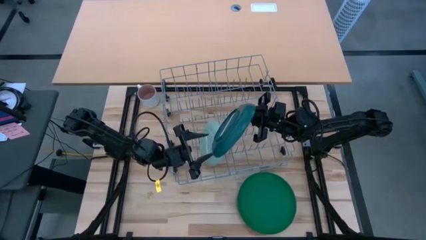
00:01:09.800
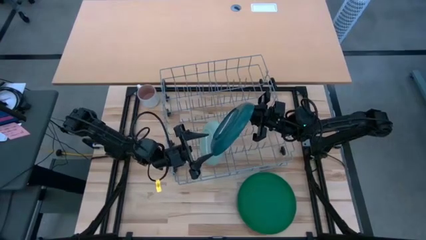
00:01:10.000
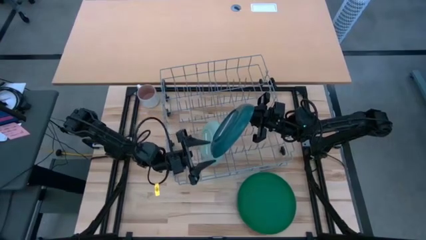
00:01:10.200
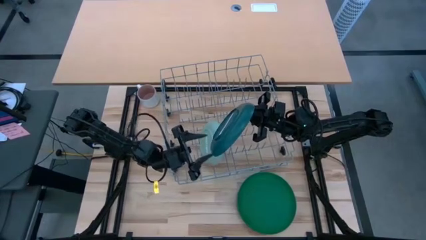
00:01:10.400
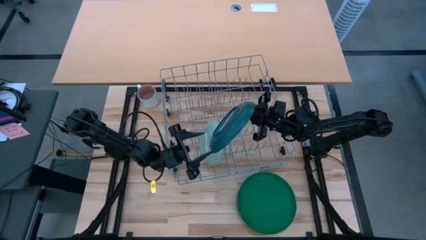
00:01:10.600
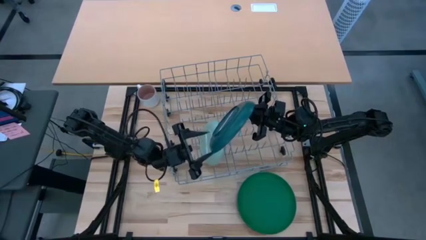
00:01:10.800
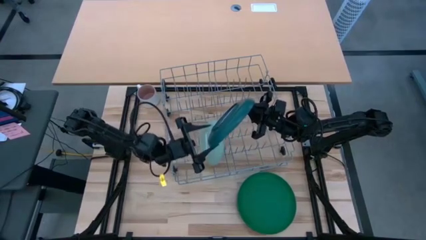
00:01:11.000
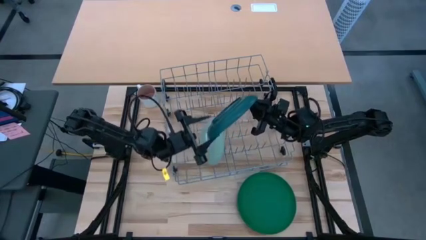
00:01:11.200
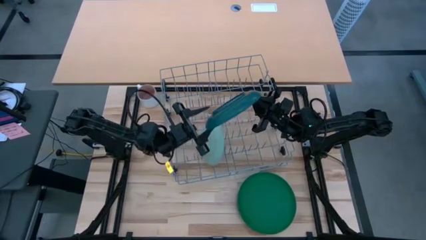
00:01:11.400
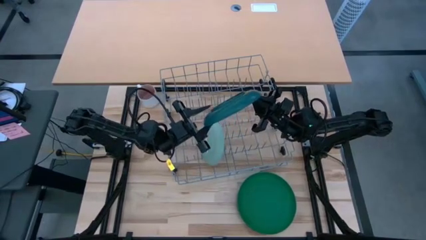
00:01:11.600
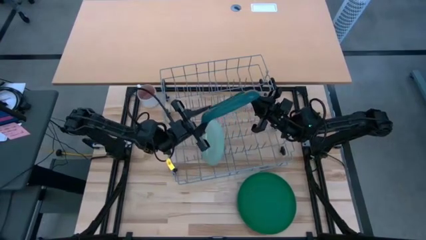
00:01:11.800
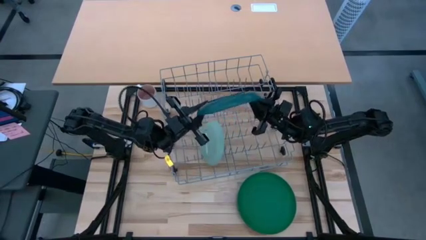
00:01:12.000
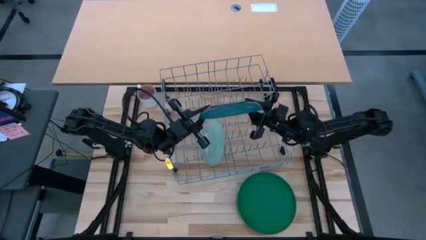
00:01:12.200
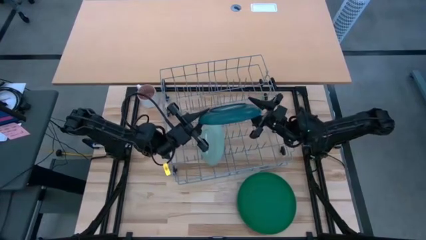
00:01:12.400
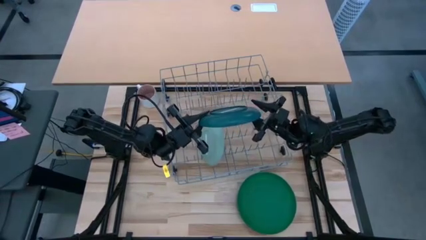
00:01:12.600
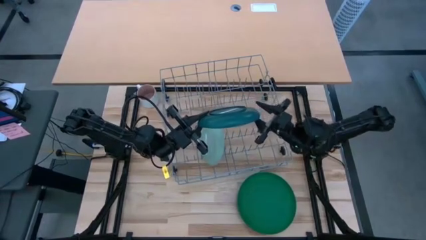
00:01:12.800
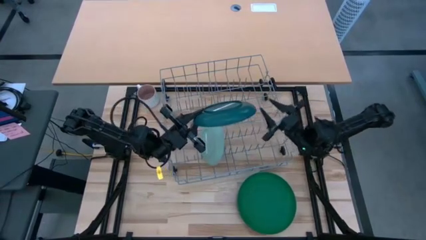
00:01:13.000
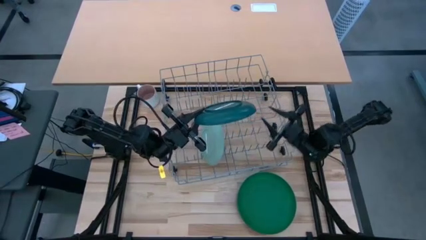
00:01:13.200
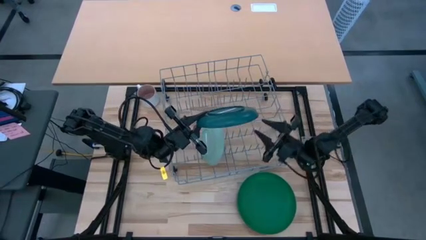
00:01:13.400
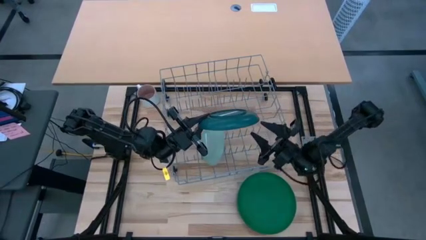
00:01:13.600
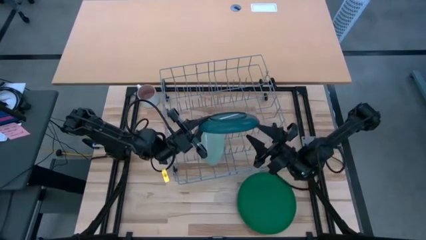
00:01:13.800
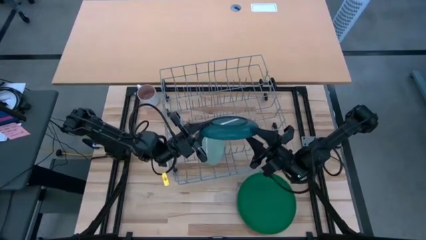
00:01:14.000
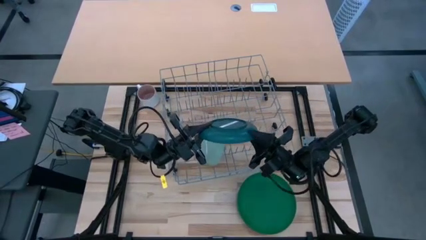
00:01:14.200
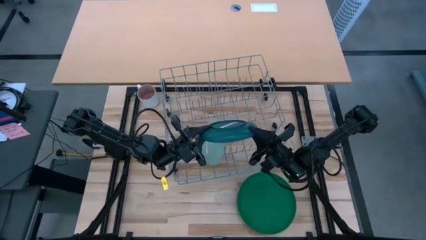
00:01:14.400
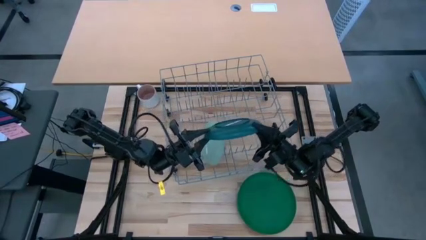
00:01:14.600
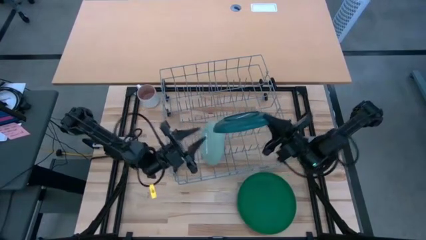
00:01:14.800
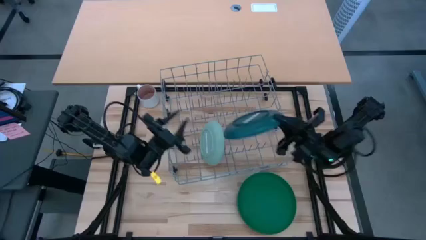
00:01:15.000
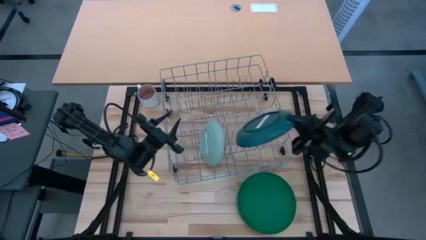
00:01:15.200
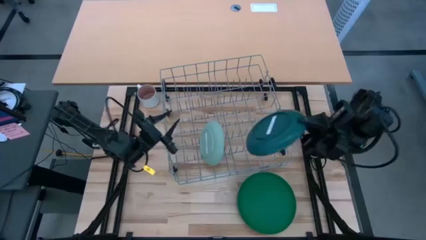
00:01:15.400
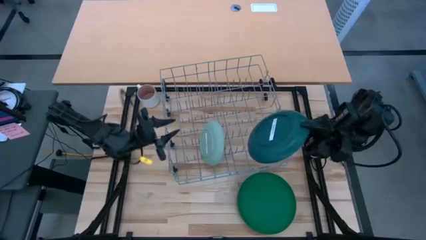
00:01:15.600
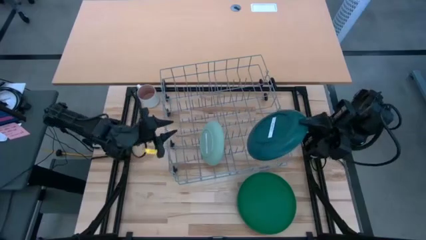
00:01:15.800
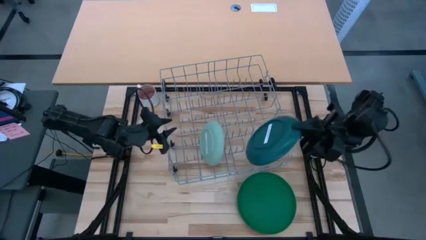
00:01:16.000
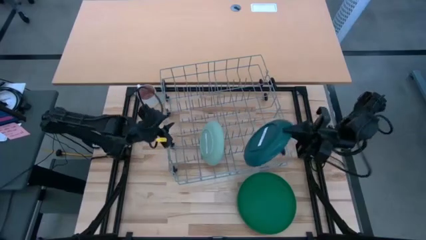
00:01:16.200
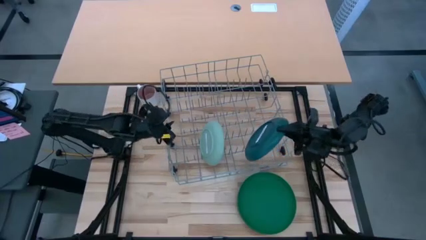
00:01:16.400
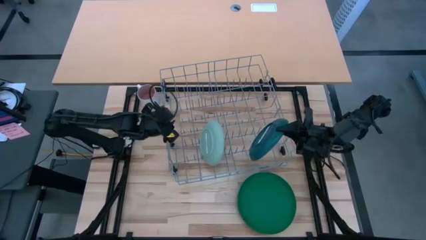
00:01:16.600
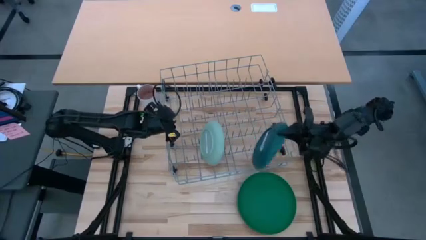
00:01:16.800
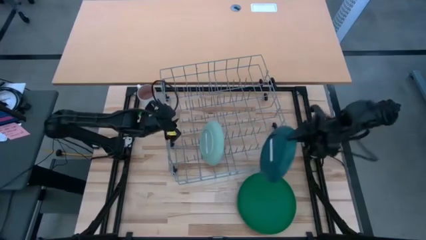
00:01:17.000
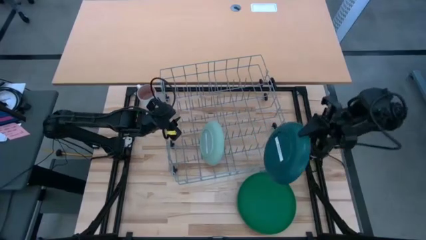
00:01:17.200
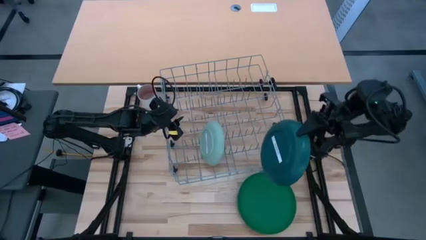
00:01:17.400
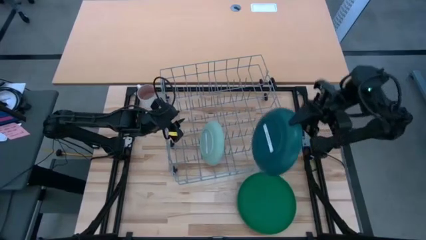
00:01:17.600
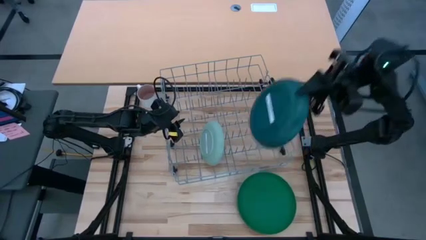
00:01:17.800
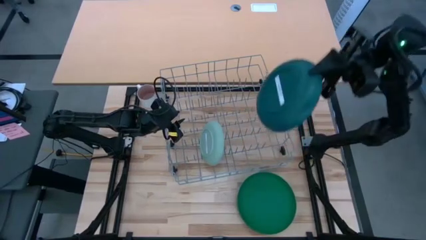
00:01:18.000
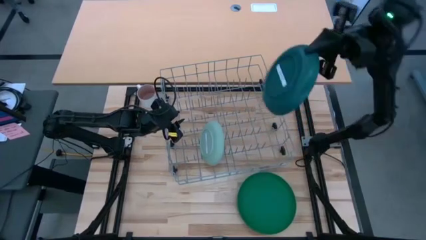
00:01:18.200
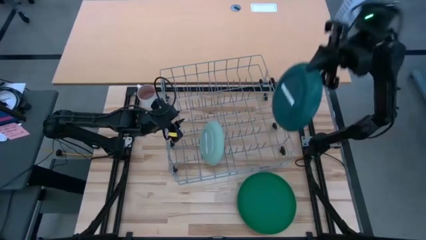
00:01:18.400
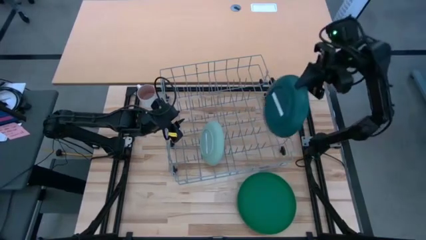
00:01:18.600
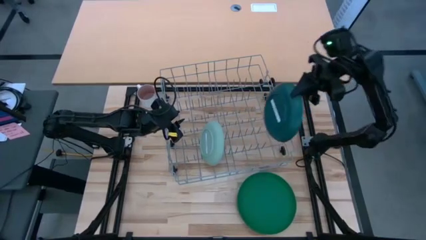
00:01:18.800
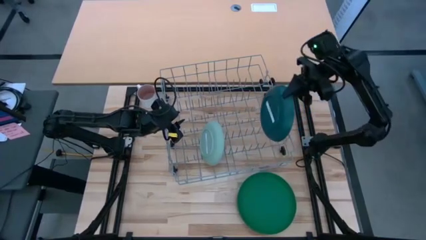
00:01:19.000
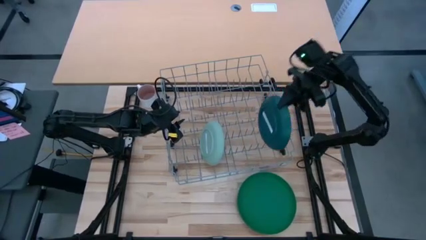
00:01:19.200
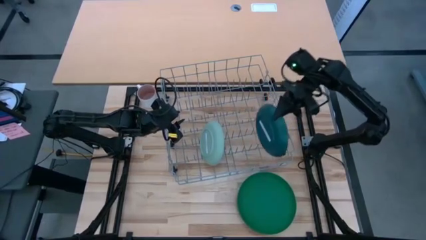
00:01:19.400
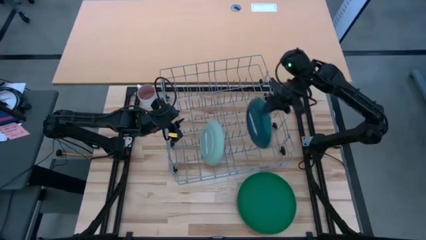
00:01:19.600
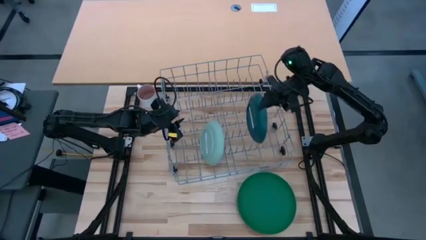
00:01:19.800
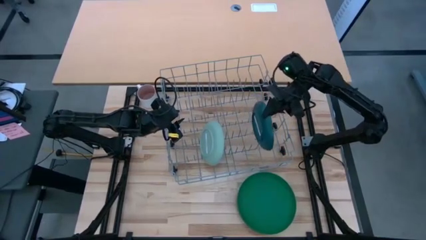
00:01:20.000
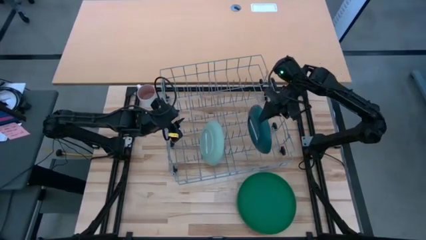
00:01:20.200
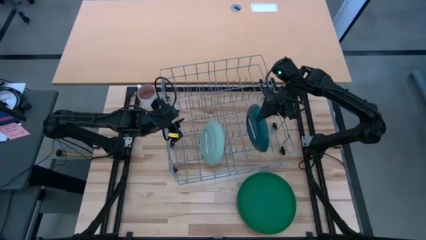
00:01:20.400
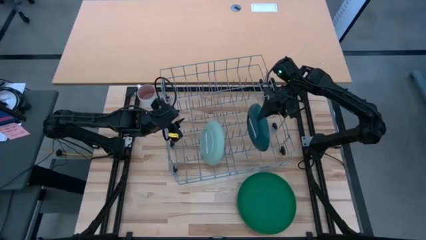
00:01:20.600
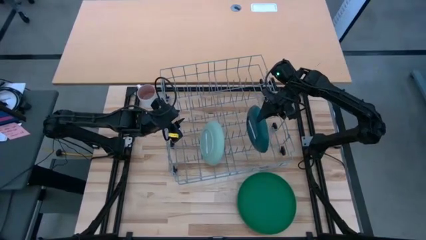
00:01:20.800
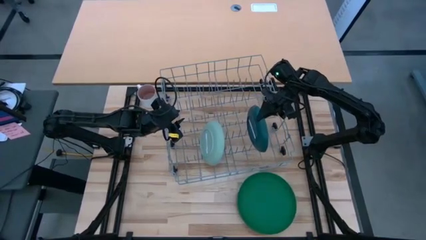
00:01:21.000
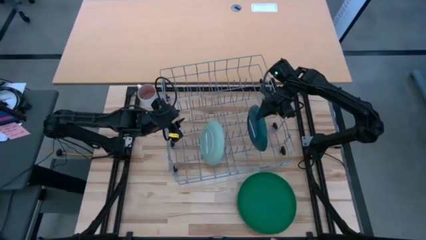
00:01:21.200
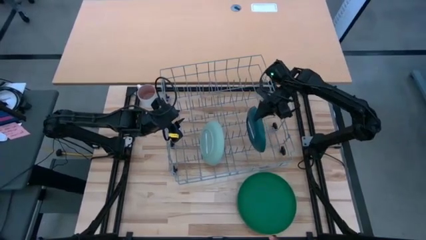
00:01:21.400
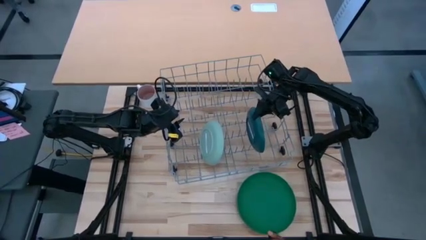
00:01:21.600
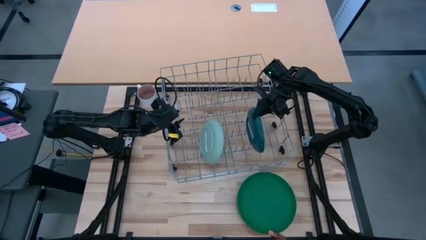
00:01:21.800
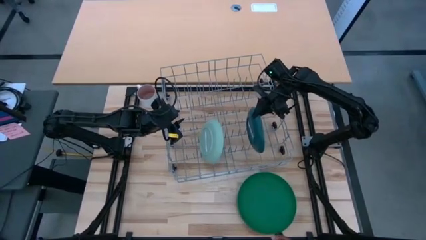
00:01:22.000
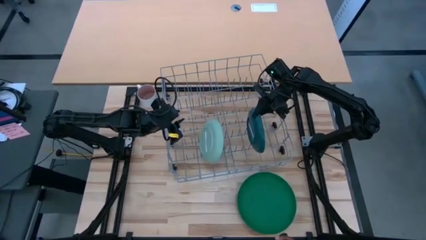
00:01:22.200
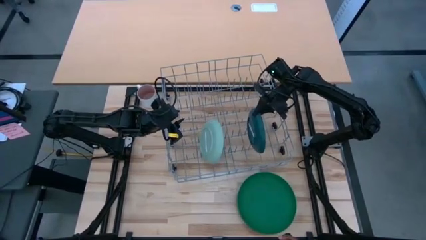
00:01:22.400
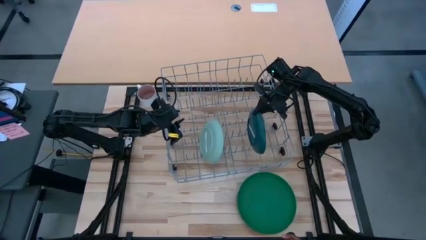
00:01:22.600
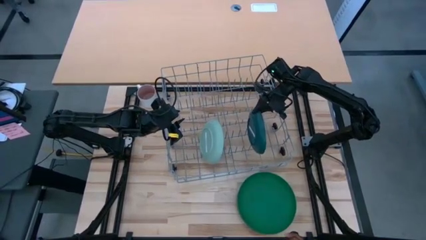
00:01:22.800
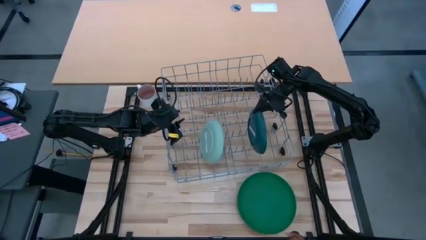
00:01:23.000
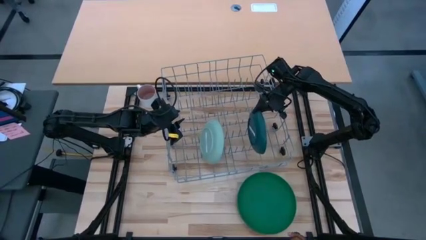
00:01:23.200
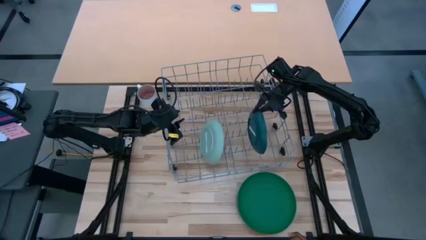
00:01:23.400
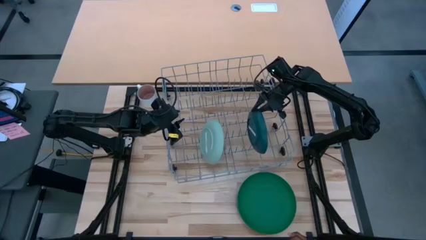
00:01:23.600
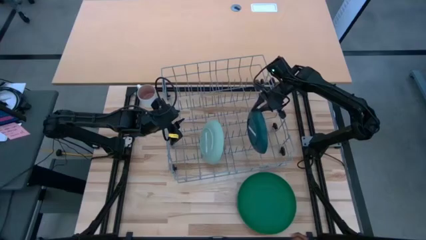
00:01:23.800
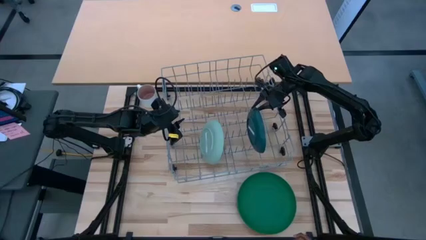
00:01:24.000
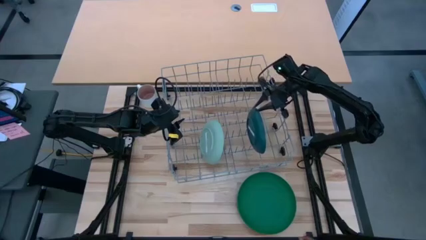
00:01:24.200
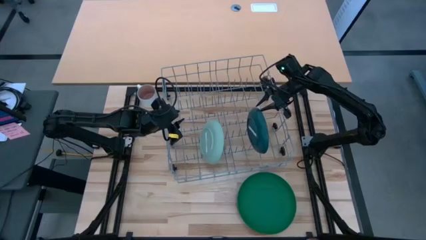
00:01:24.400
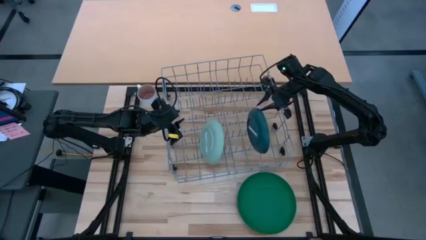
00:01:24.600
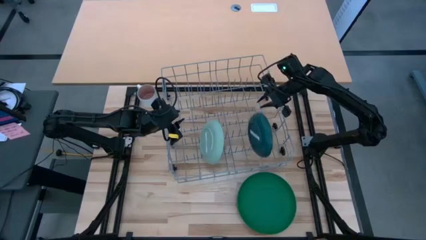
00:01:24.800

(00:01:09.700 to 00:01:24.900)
Task: Sort dishes
Put the dark blue plate in the dish rack
